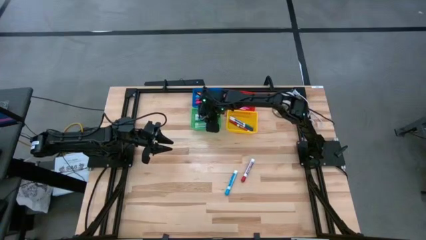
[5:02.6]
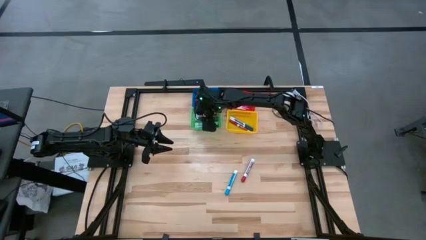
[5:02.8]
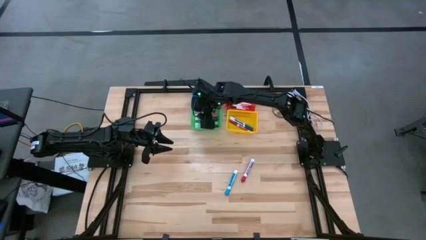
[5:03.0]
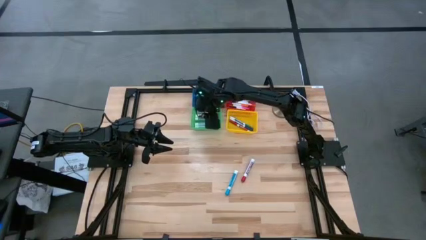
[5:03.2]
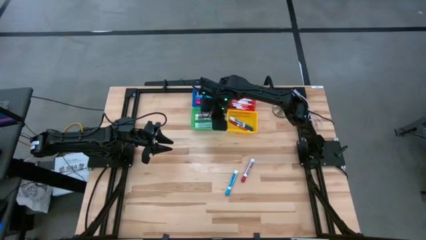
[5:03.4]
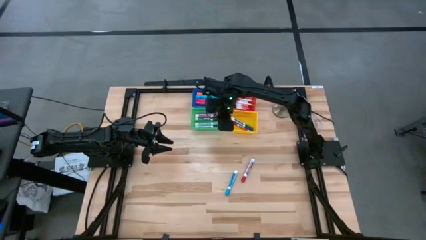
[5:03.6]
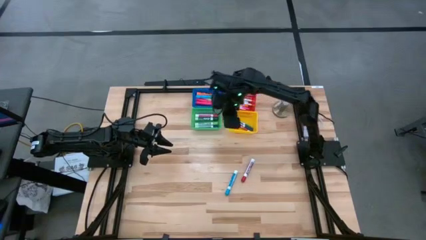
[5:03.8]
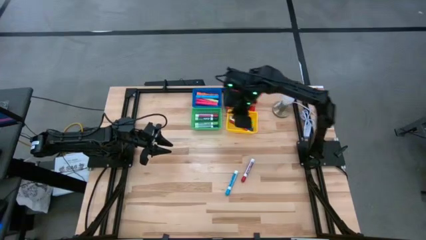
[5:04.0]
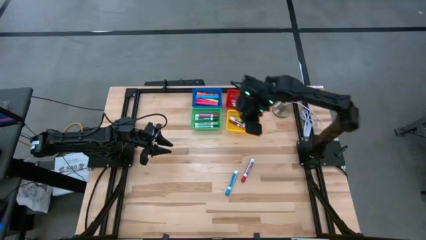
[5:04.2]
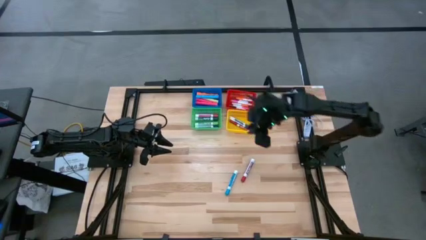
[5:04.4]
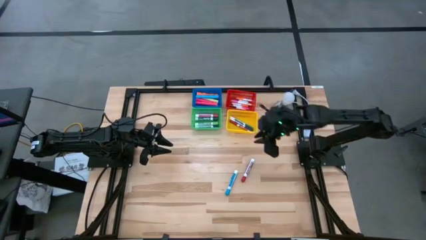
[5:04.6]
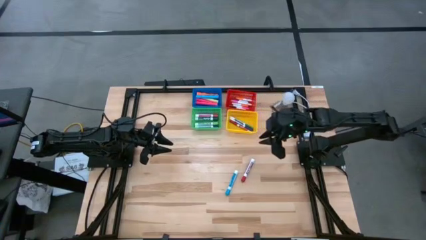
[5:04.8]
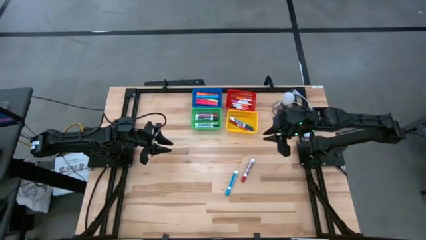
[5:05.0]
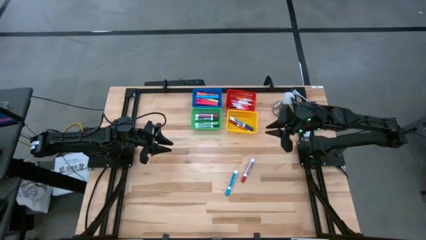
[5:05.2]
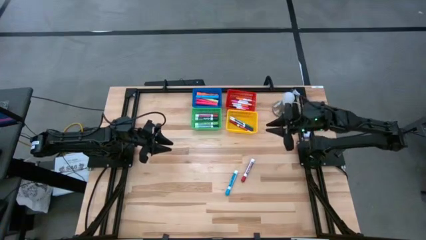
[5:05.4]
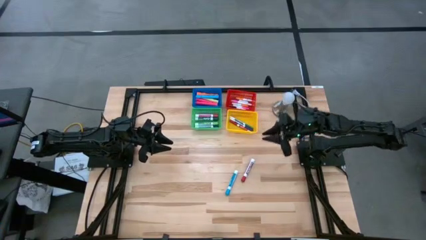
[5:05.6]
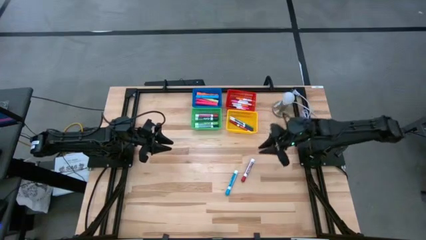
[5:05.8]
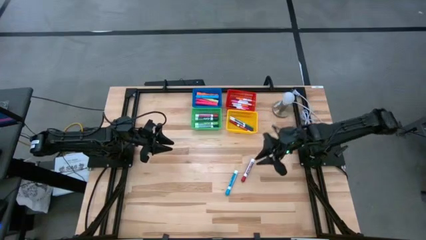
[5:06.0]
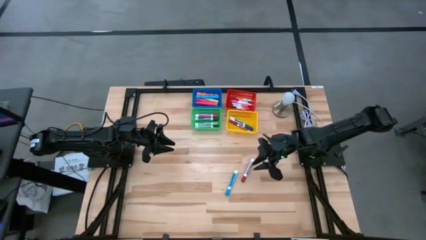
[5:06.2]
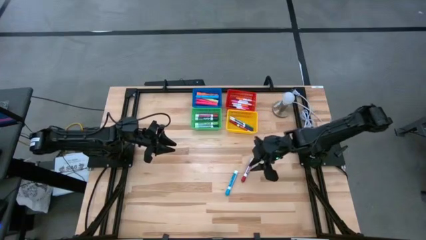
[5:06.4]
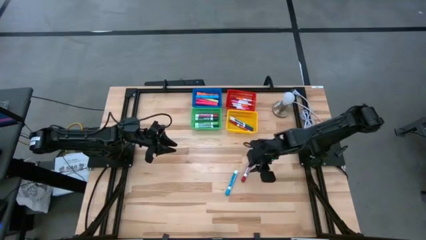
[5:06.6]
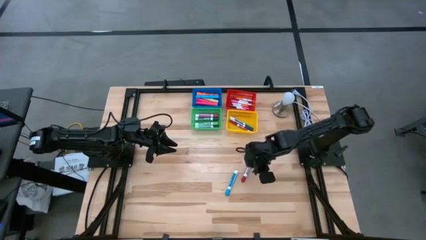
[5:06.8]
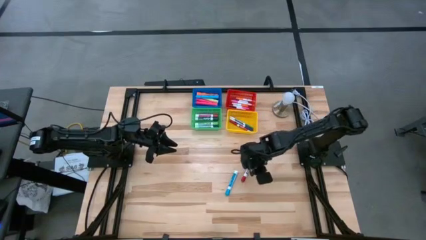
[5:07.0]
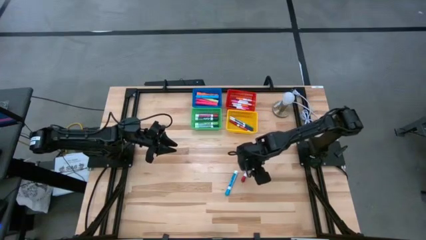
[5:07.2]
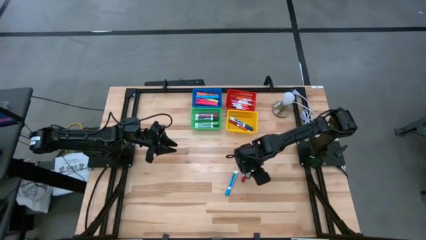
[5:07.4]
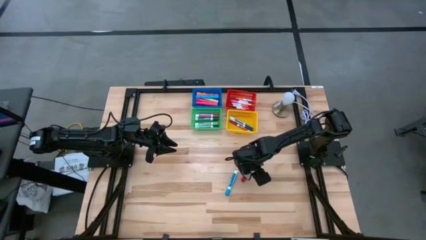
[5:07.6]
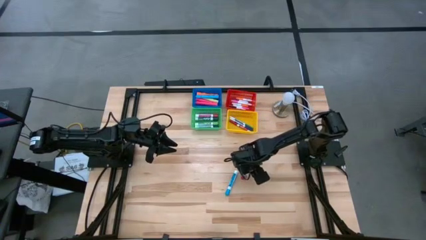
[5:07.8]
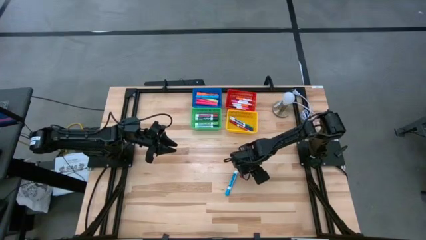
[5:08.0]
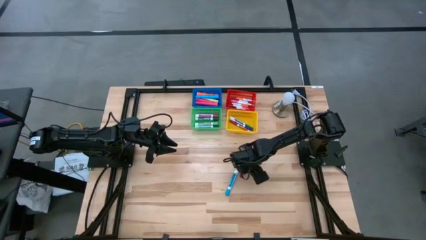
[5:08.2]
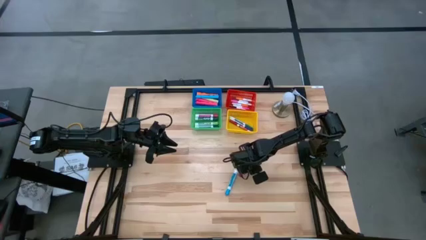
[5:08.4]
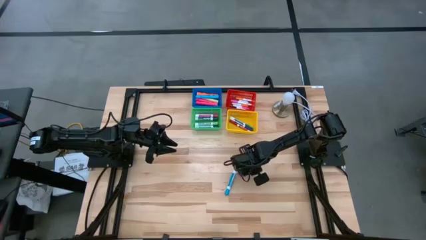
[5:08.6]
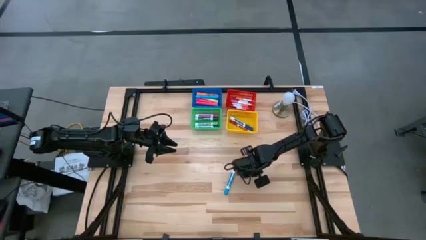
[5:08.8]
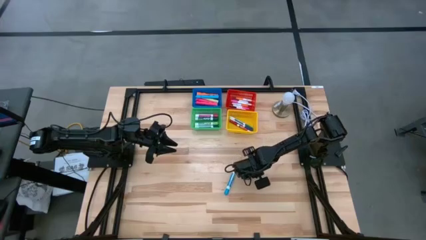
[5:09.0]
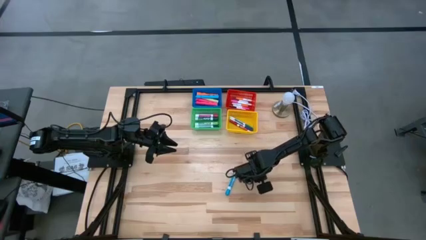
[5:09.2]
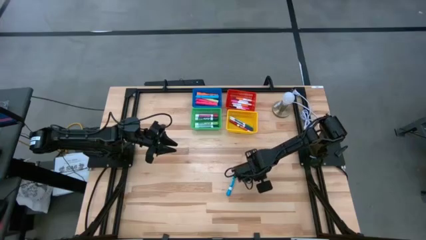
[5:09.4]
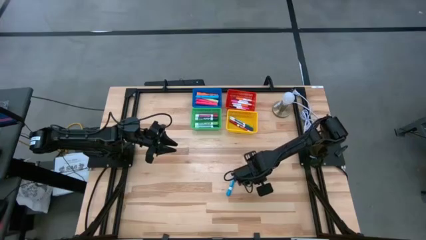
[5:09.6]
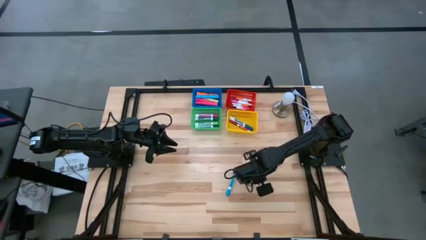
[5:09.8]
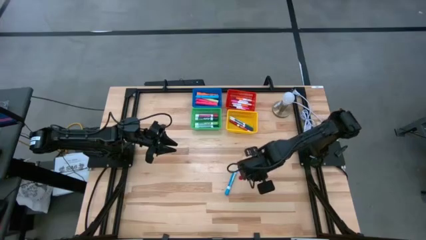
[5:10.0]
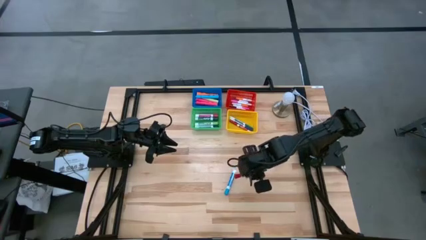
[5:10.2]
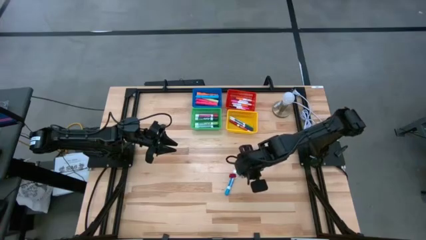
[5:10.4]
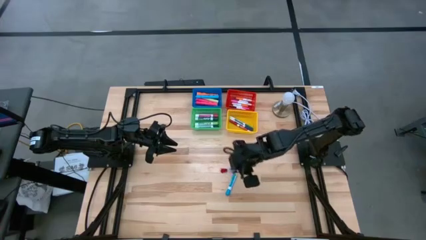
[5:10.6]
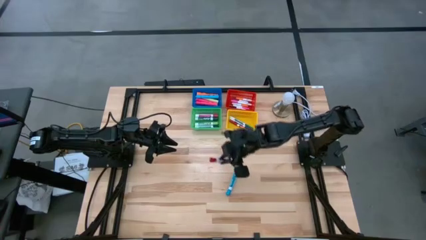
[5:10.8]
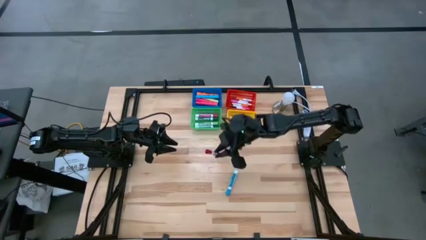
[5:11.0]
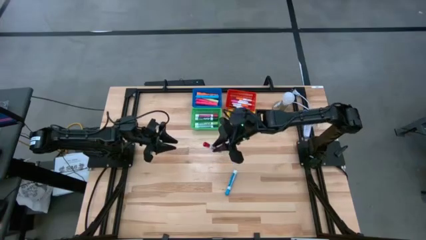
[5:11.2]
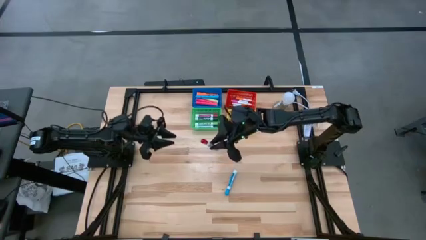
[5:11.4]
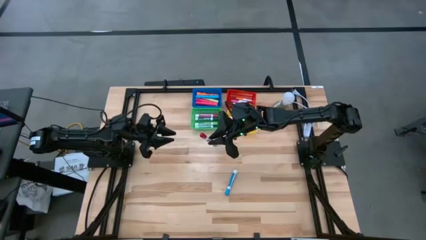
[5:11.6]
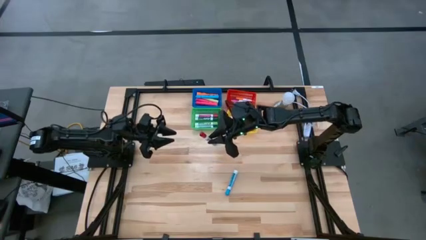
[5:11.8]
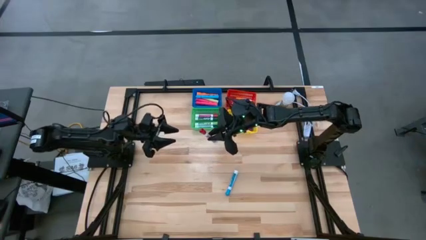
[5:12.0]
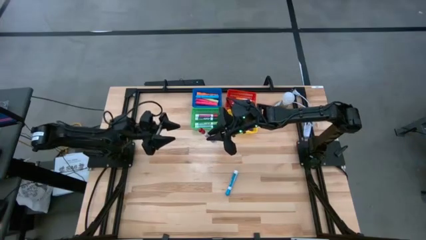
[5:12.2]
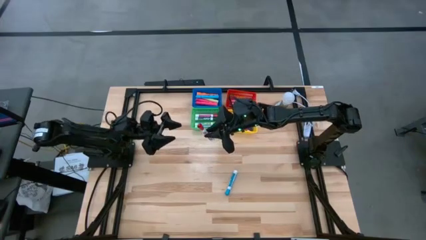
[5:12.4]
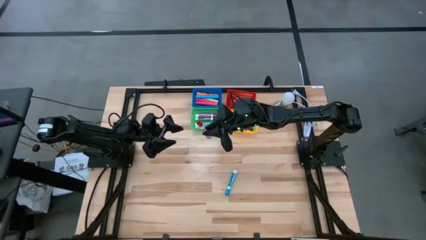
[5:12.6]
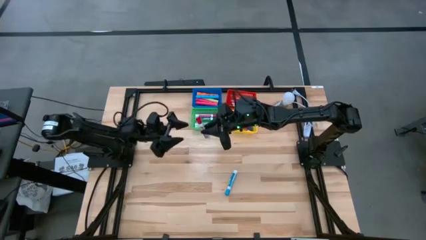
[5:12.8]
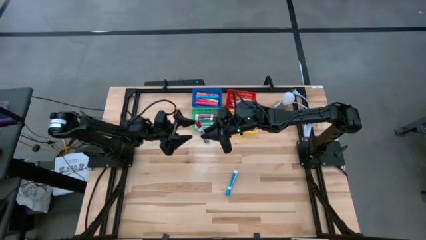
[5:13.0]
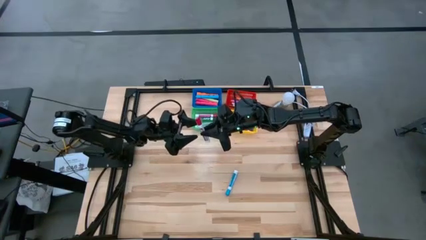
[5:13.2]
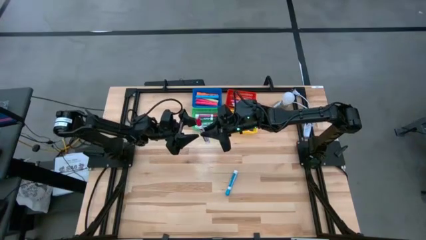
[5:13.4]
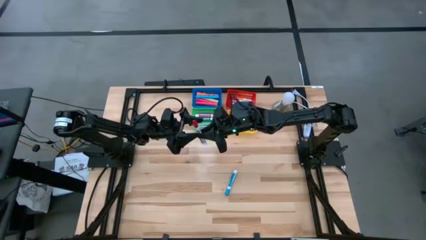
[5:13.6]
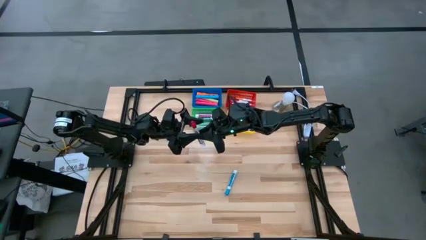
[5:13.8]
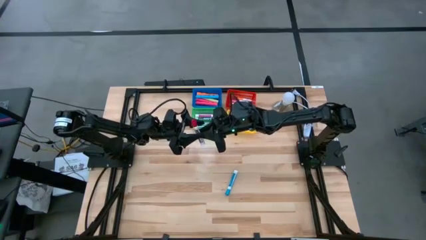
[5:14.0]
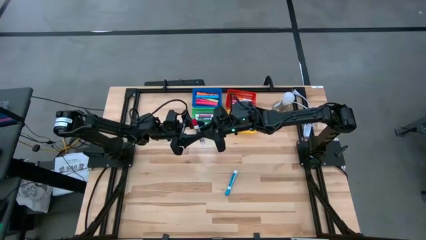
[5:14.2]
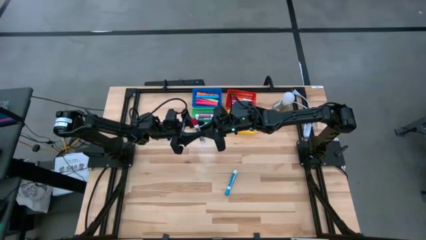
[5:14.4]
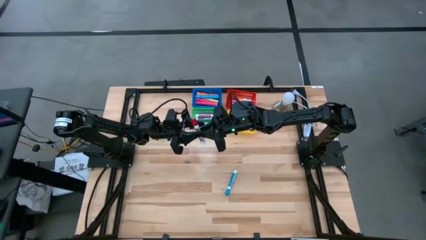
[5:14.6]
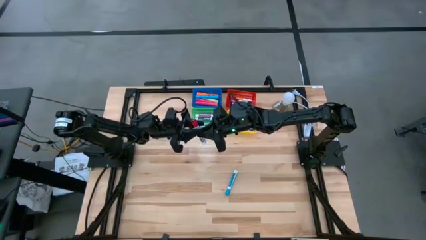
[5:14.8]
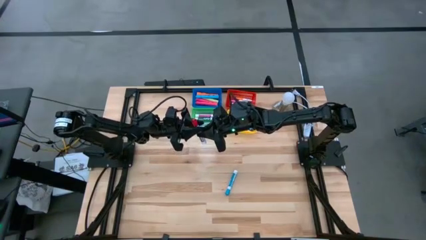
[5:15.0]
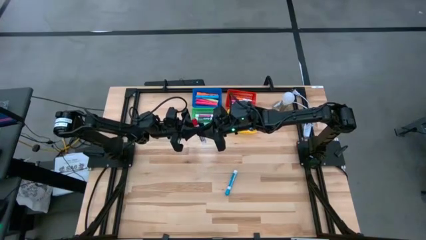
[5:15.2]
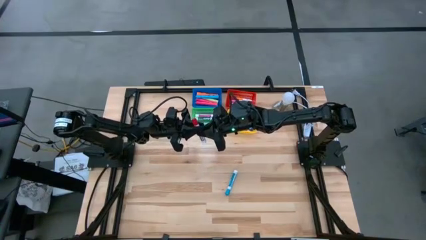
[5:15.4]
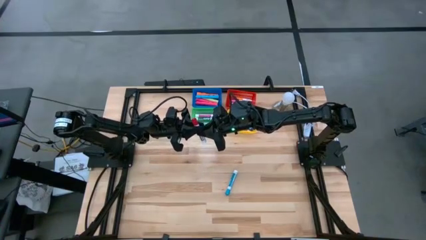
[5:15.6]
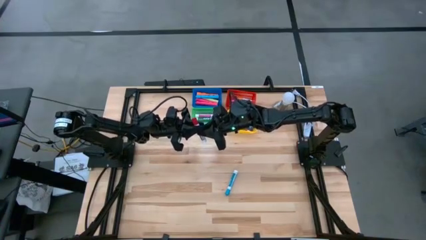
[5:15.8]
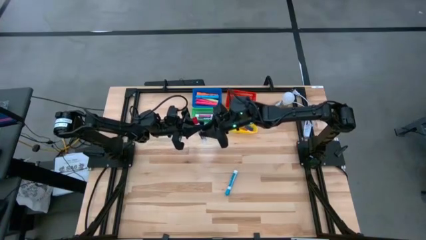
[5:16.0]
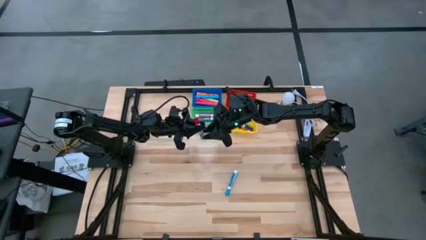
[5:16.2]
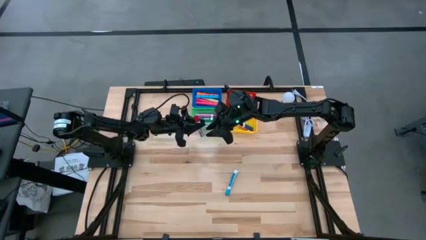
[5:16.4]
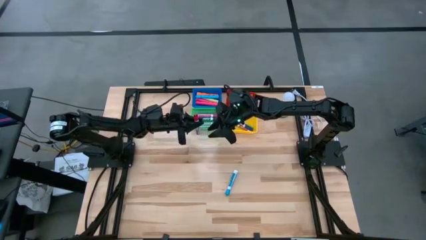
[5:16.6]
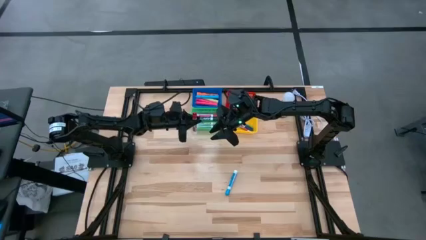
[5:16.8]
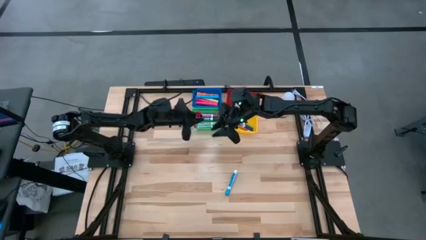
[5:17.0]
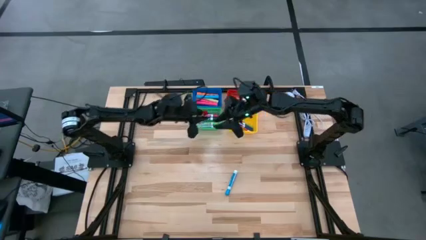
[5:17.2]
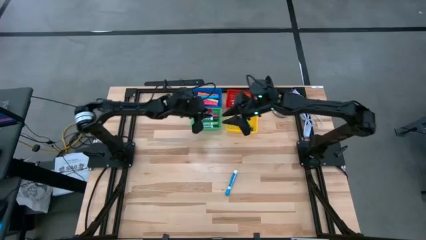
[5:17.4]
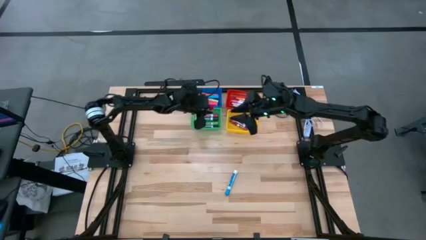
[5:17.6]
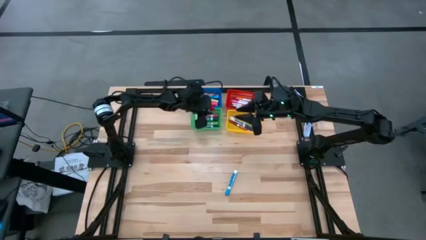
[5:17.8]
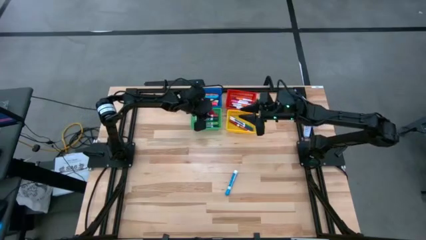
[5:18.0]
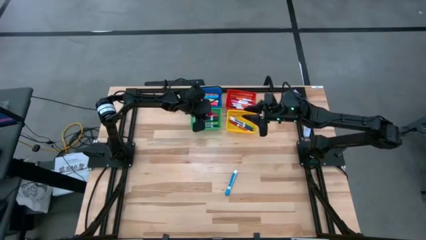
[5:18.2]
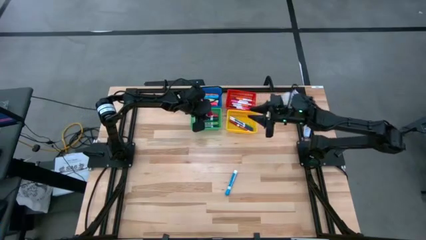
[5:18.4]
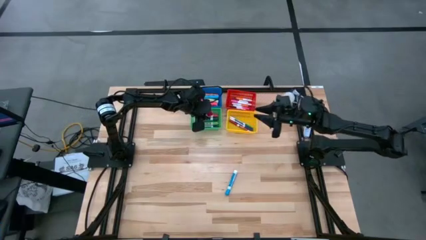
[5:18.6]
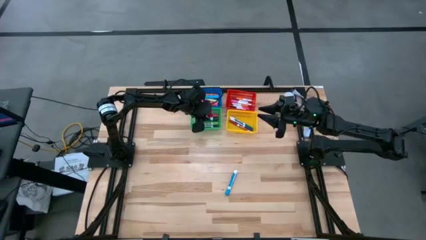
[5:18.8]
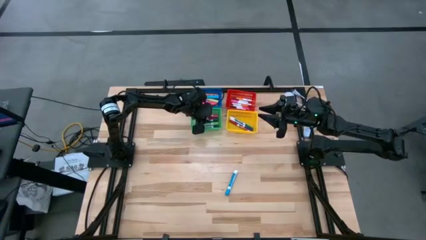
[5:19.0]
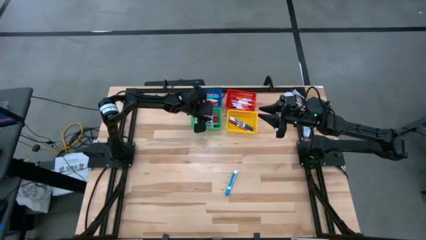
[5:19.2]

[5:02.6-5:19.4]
Task: Pick & Place Markers
Put the large red marker into the green basket
